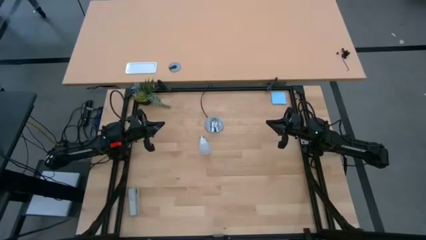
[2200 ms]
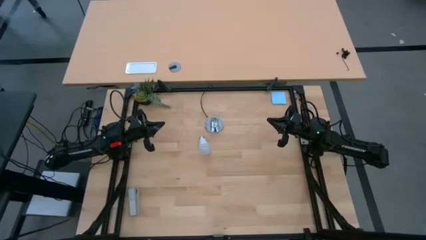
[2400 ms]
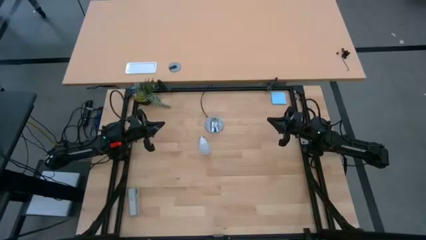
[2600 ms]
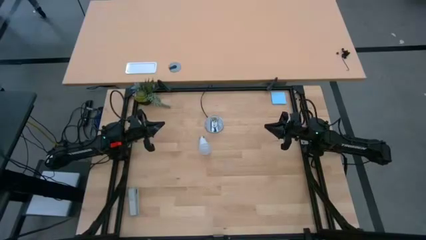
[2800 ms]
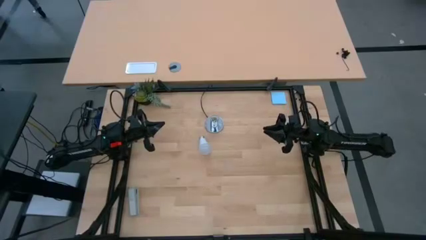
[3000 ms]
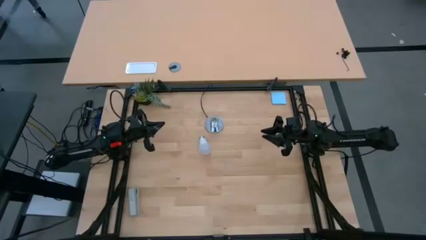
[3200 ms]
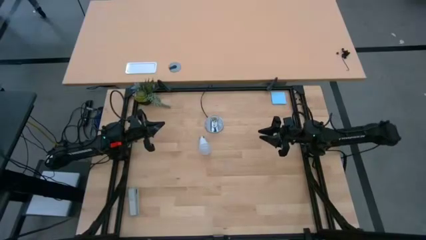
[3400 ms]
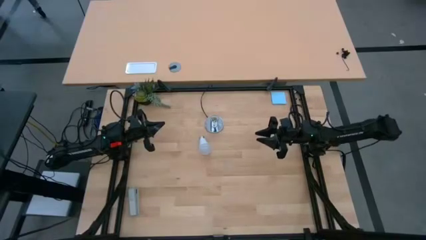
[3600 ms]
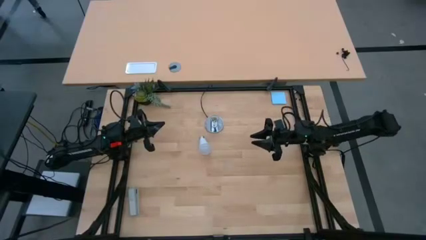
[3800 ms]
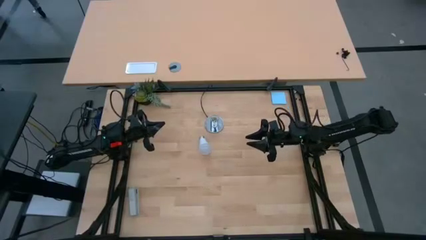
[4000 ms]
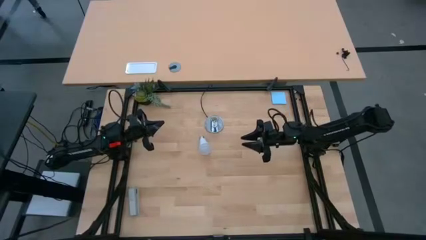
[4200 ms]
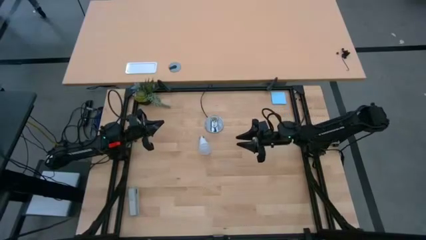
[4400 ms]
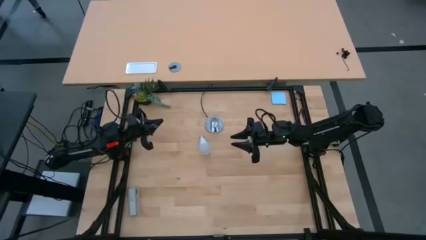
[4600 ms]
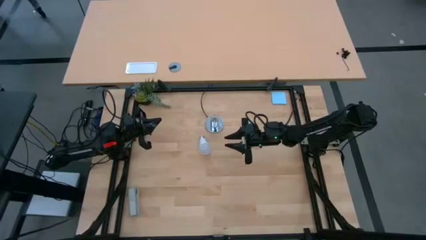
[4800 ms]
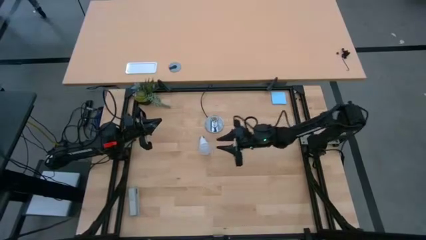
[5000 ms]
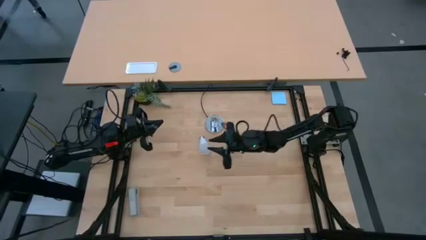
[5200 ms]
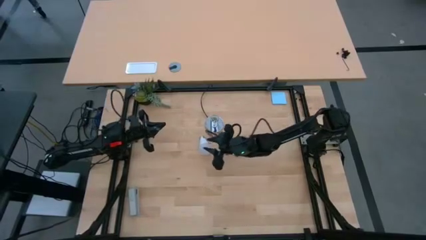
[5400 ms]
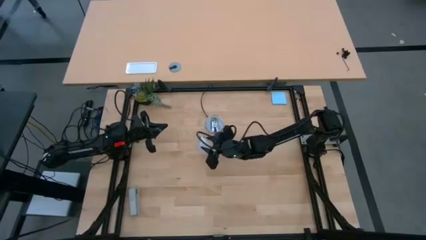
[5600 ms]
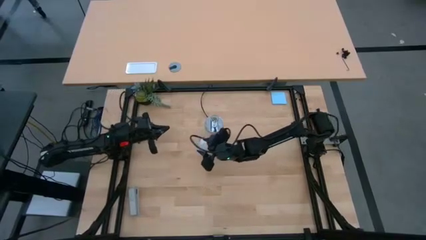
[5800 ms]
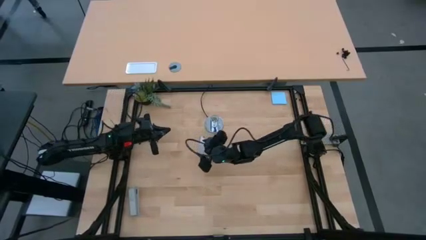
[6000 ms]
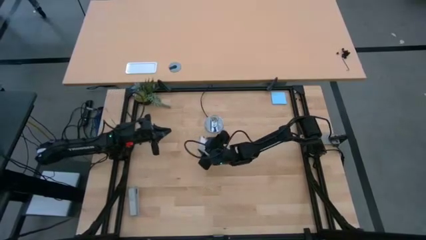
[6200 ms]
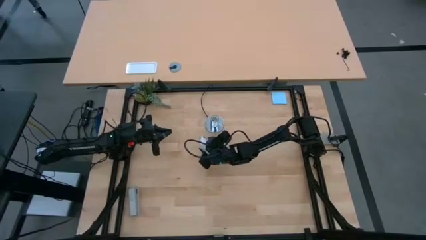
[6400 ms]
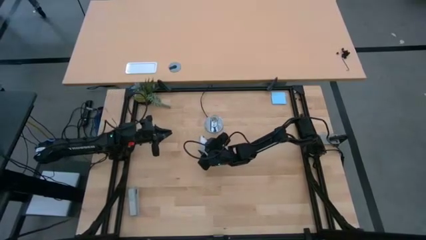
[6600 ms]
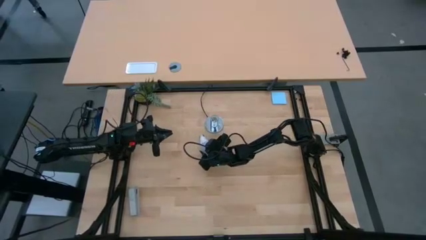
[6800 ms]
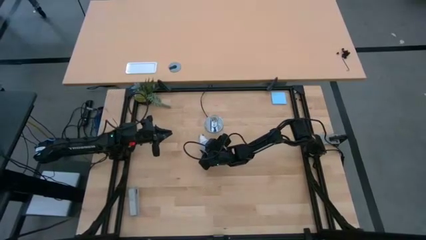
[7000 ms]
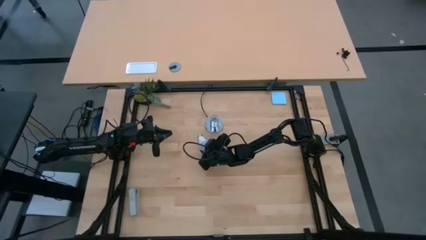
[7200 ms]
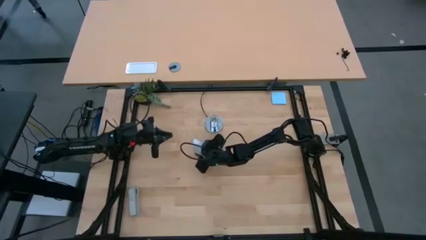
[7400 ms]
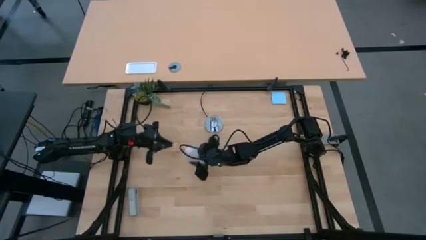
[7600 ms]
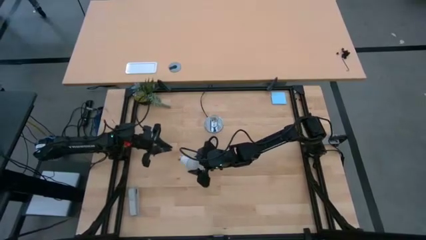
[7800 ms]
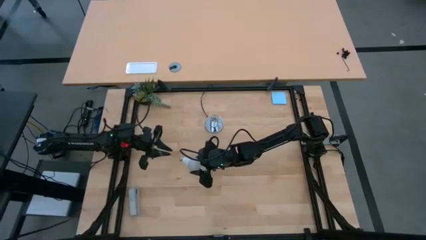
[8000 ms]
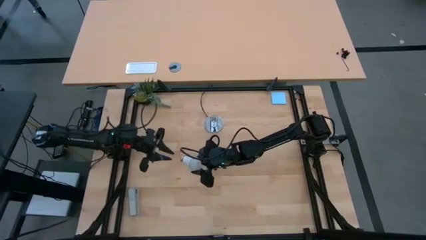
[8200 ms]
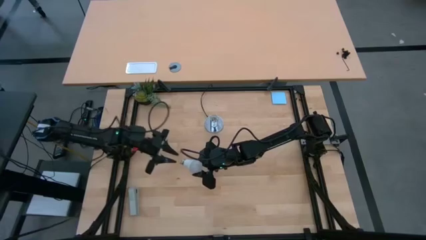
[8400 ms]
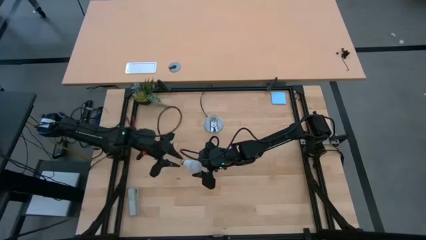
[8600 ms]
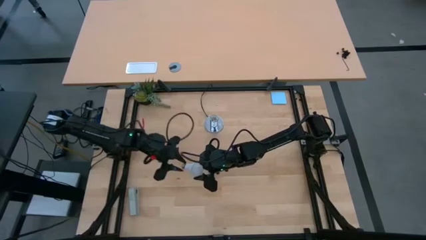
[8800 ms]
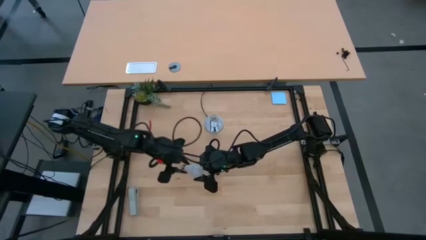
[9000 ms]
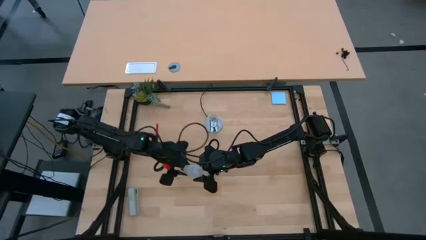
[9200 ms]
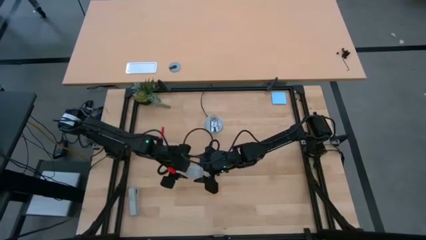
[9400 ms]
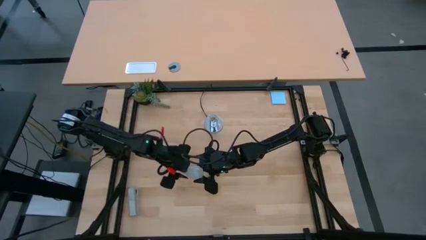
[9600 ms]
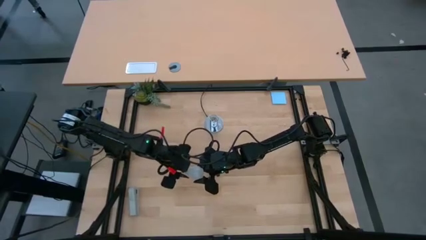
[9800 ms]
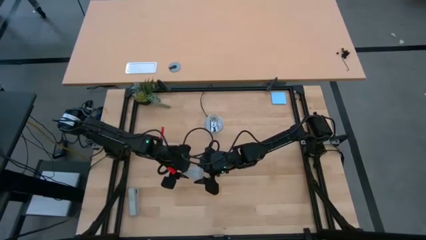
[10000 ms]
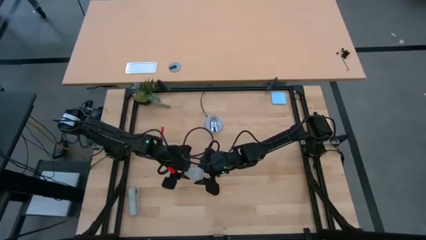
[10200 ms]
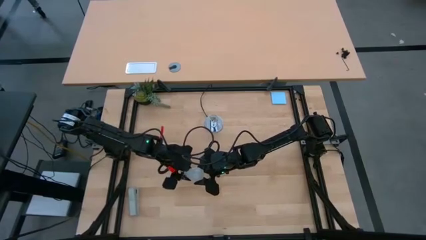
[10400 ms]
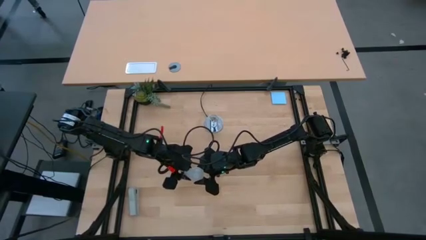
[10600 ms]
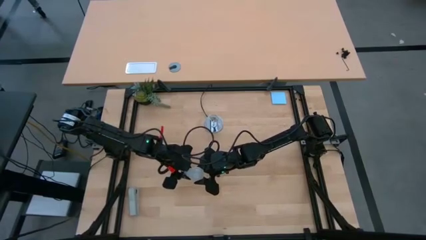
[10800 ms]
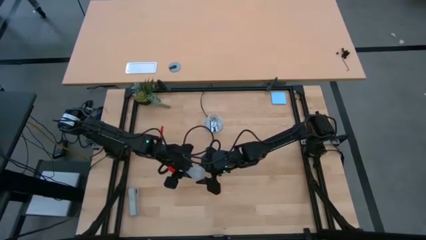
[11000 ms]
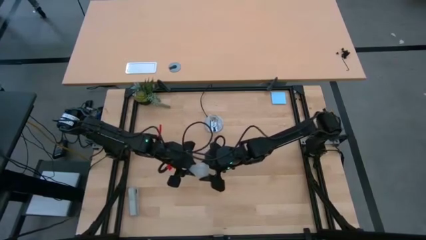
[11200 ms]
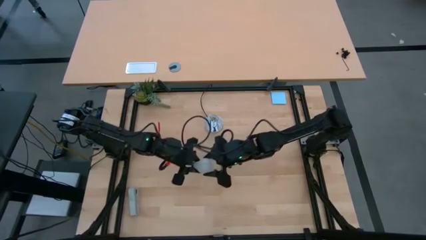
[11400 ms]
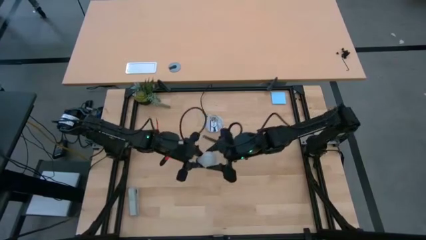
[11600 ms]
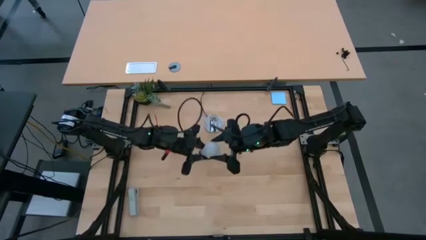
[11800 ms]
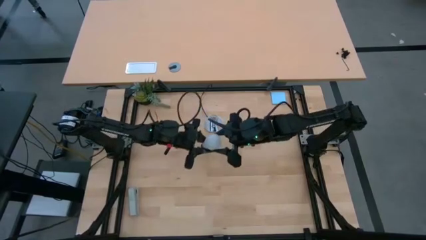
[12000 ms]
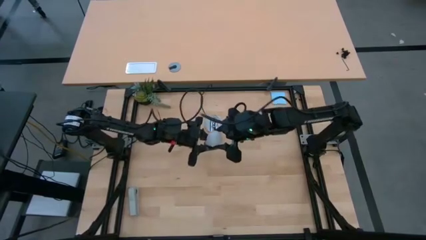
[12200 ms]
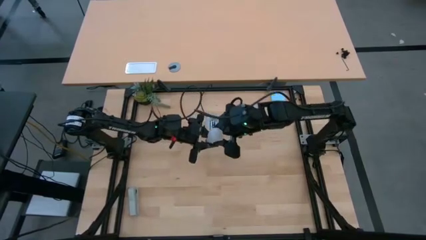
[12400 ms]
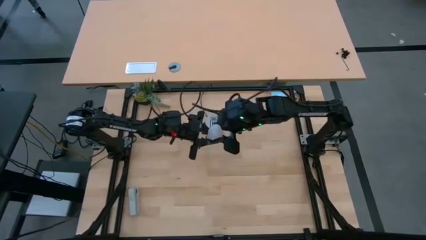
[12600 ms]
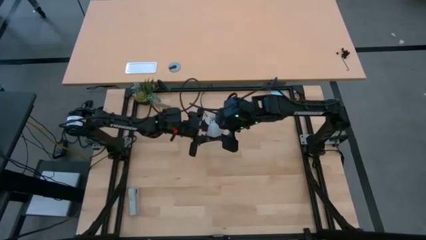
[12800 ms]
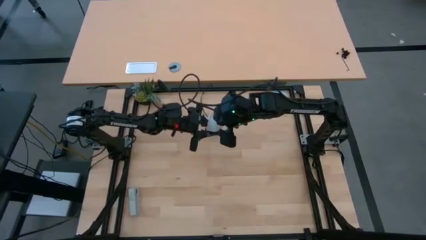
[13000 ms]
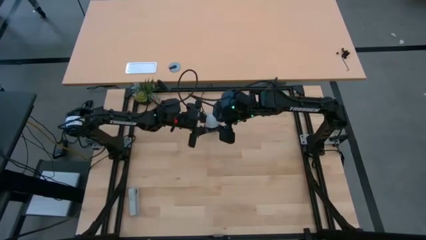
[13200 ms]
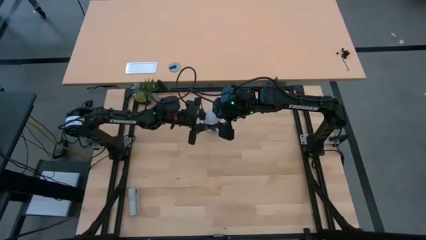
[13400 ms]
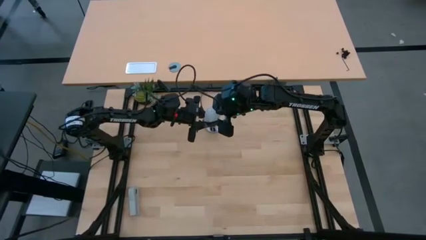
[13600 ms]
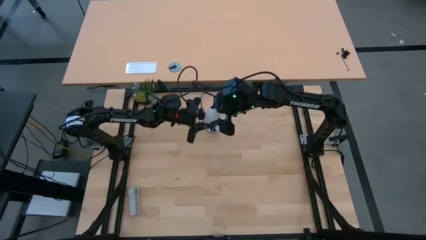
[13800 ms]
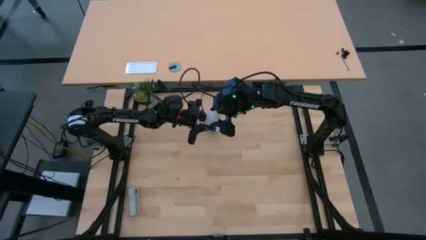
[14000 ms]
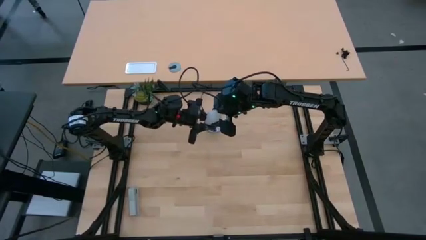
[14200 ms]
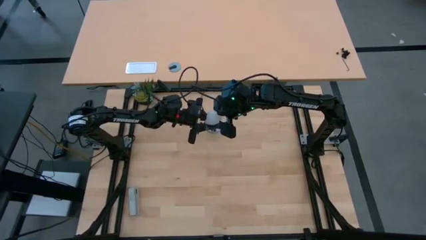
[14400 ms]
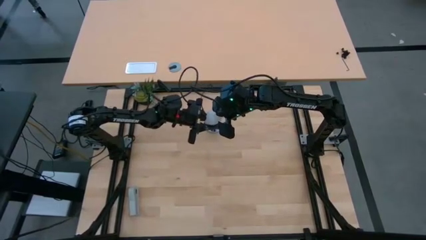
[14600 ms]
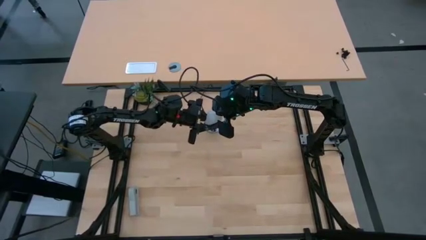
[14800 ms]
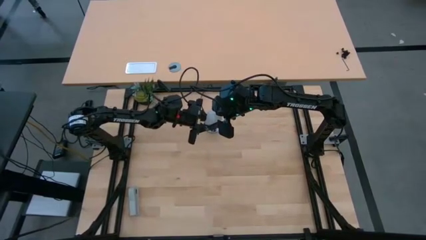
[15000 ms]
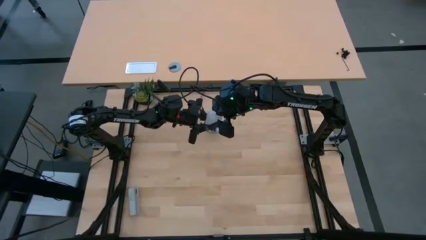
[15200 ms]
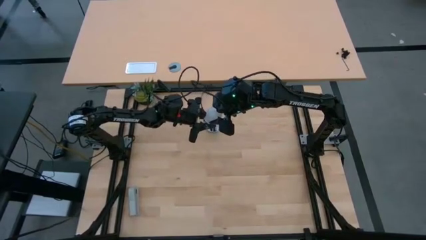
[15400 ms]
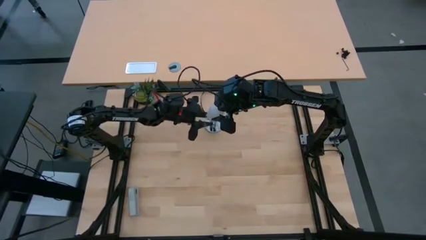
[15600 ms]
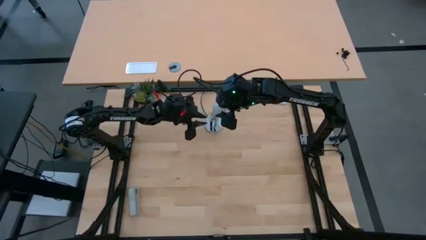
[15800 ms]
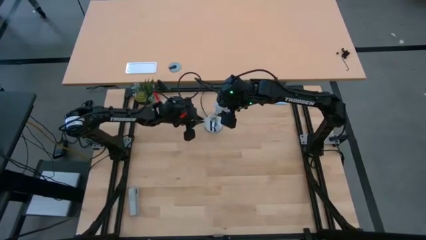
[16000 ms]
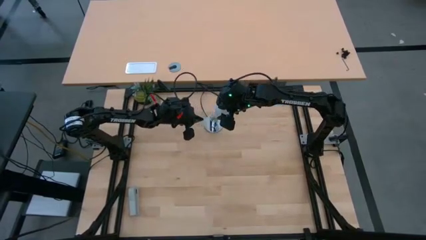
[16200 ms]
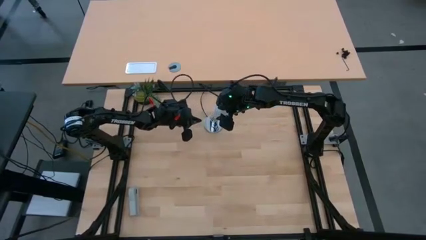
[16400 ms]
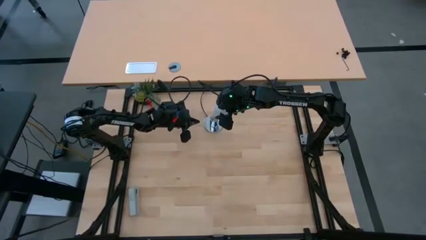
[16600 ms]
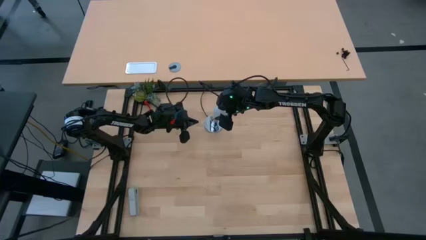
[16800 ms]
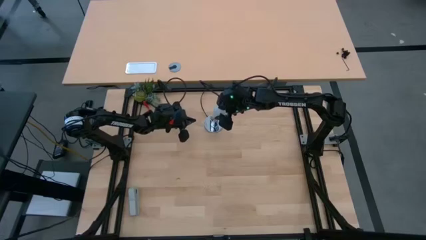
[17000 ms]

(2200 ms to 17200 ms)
Task: Screw lightbulb
Insert the white lightbulb into the silver lamp
